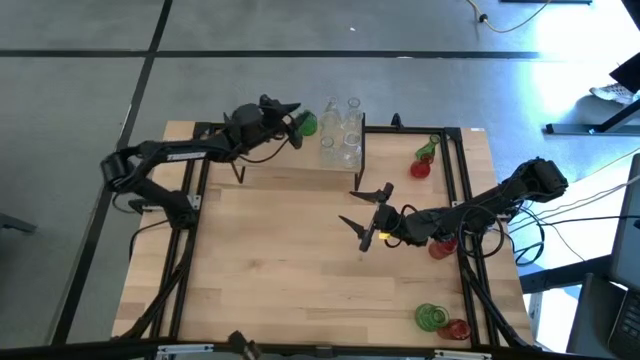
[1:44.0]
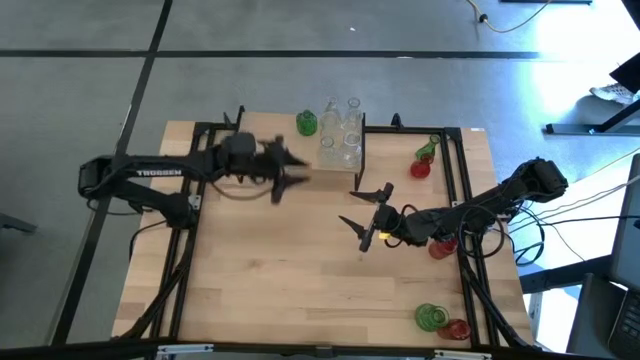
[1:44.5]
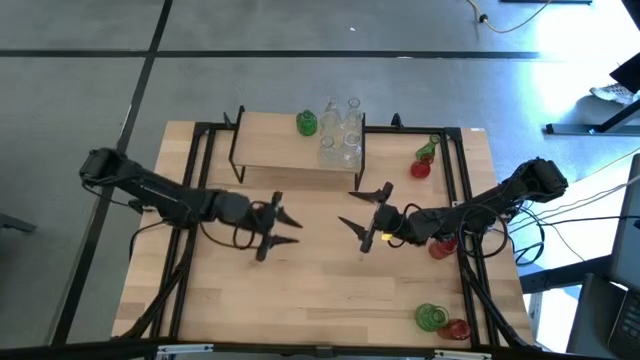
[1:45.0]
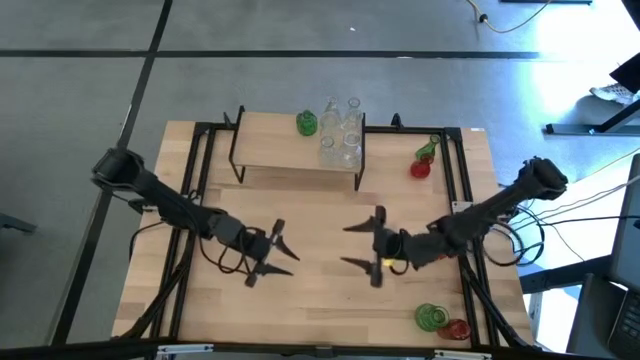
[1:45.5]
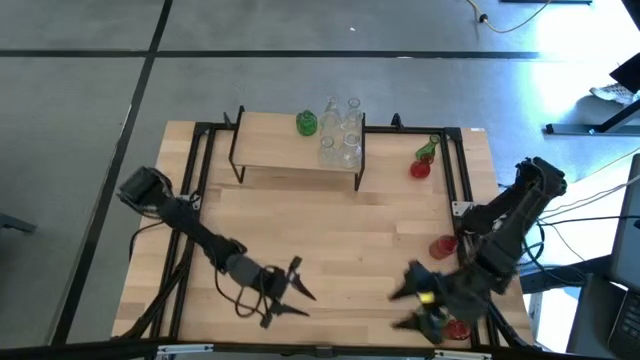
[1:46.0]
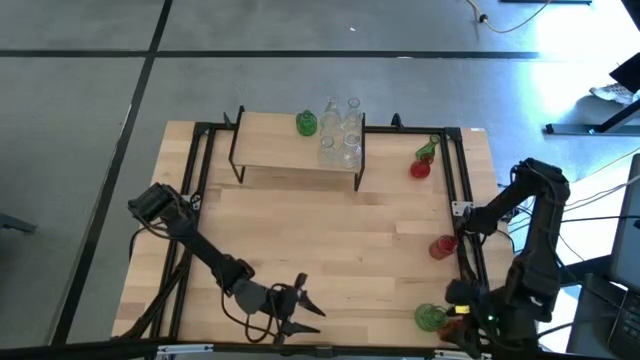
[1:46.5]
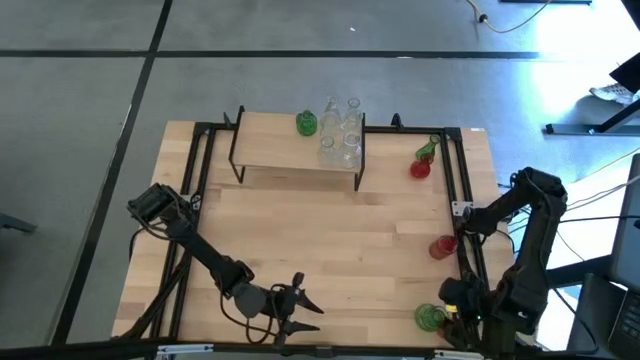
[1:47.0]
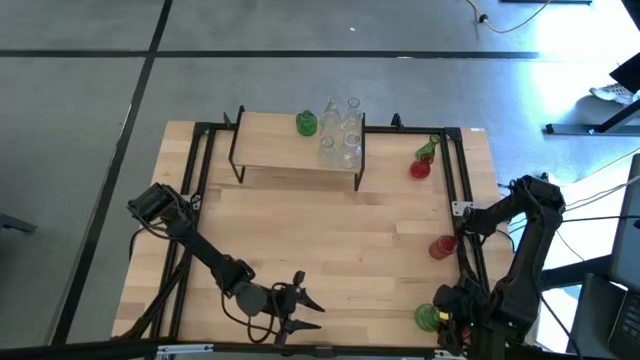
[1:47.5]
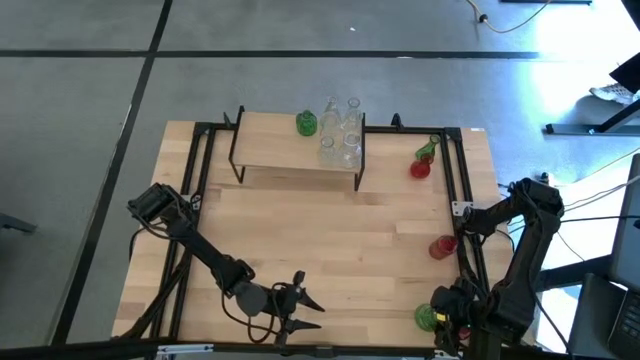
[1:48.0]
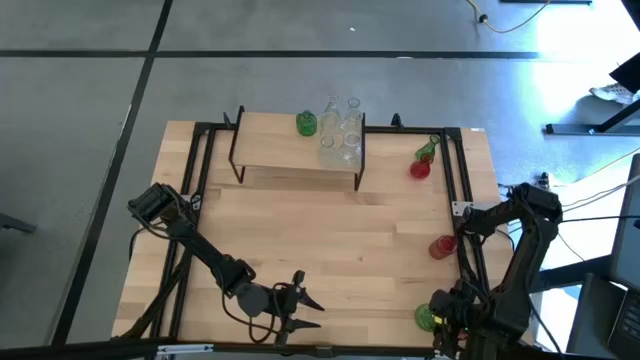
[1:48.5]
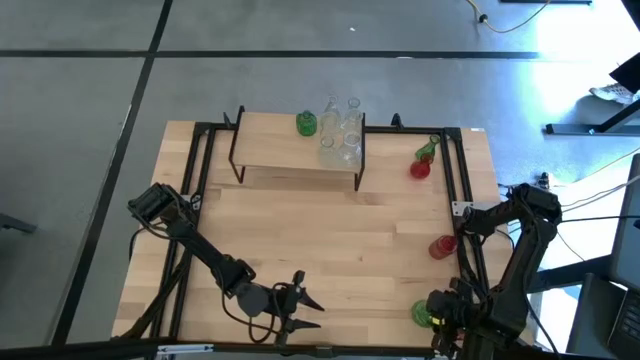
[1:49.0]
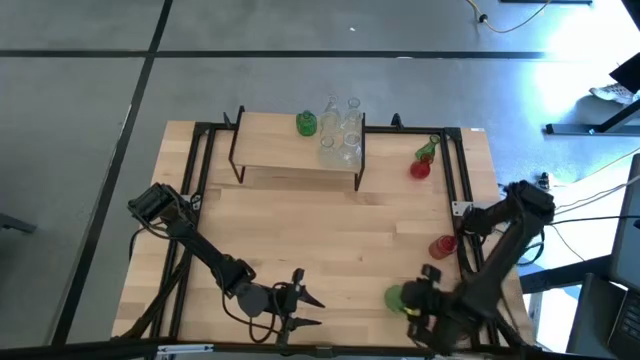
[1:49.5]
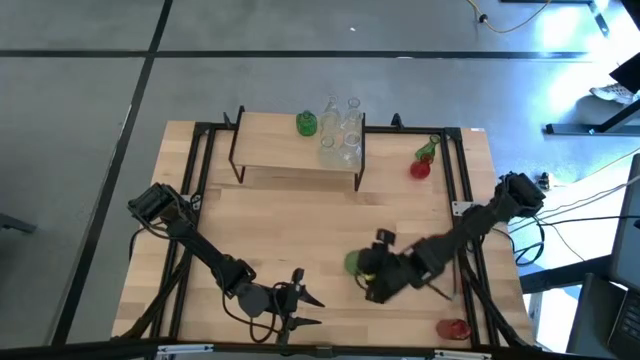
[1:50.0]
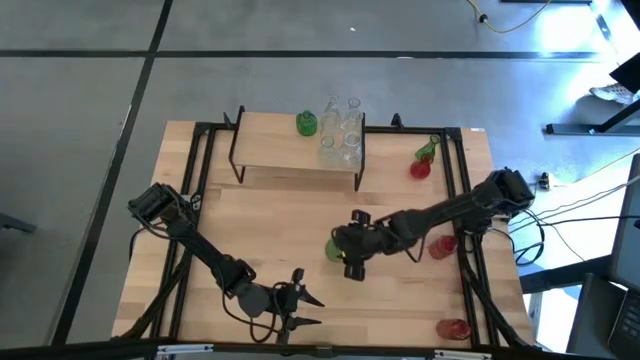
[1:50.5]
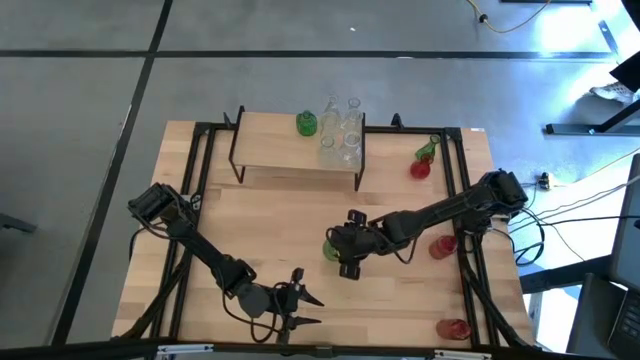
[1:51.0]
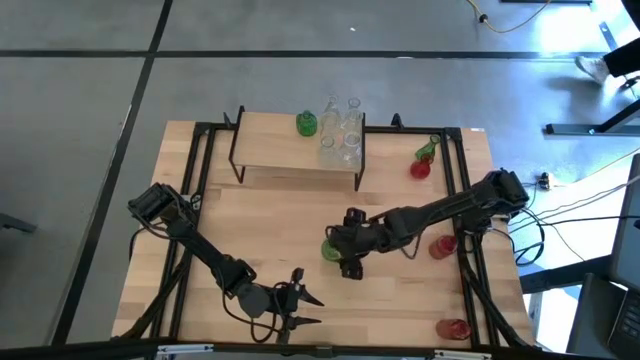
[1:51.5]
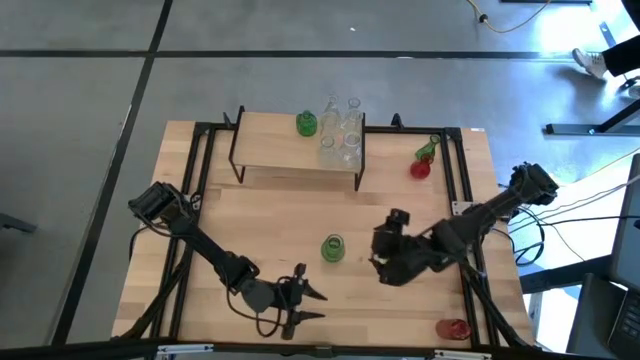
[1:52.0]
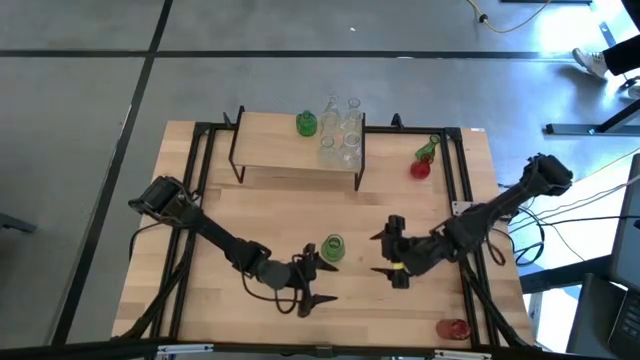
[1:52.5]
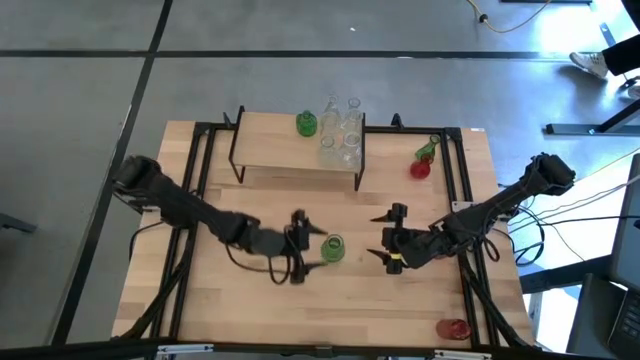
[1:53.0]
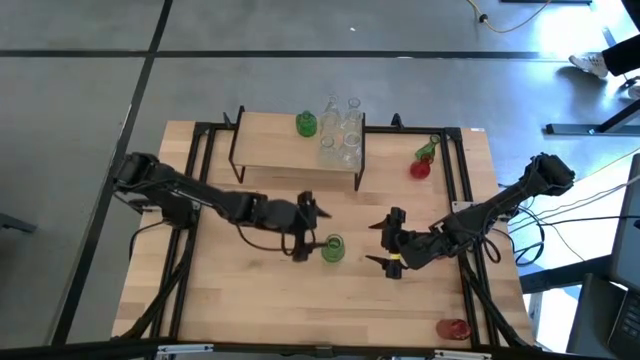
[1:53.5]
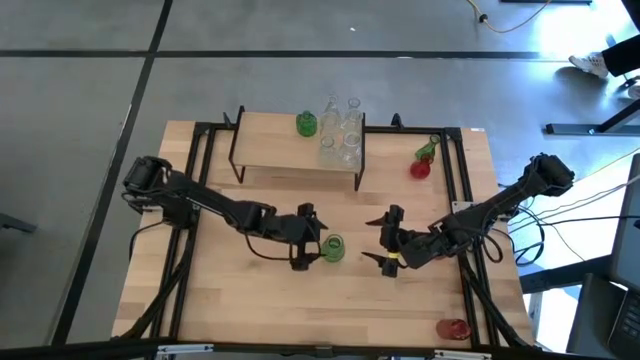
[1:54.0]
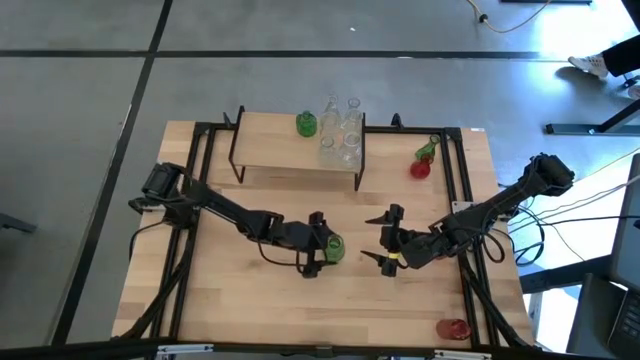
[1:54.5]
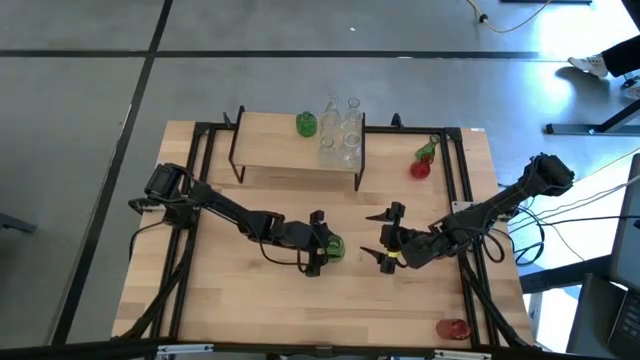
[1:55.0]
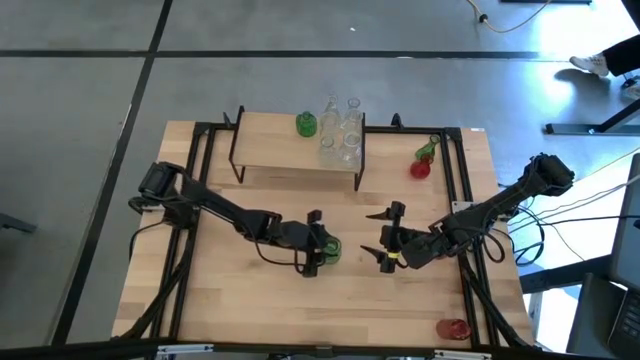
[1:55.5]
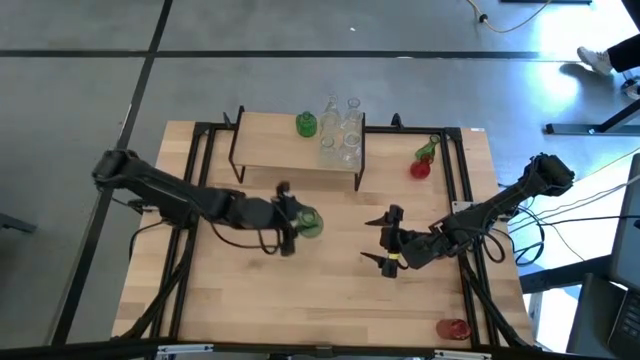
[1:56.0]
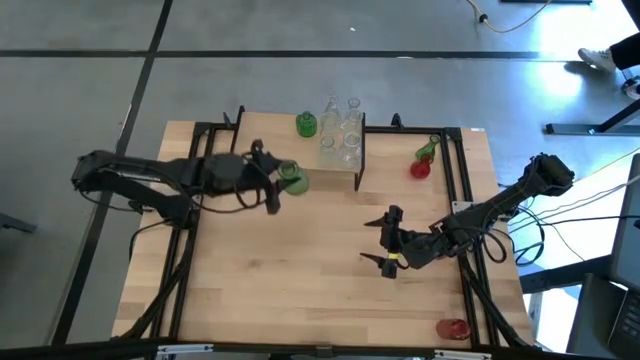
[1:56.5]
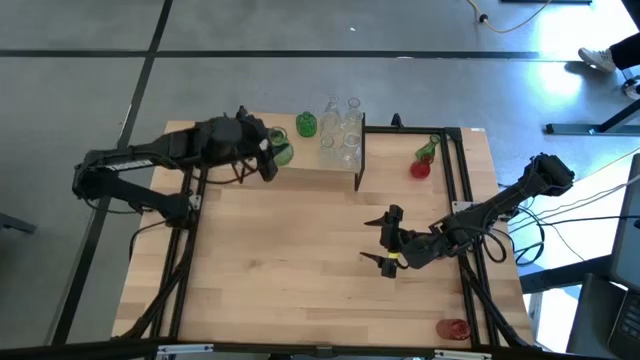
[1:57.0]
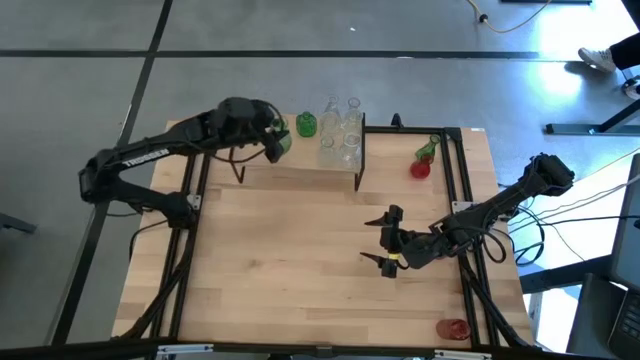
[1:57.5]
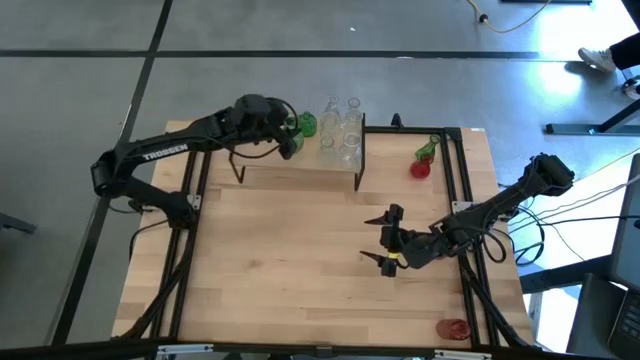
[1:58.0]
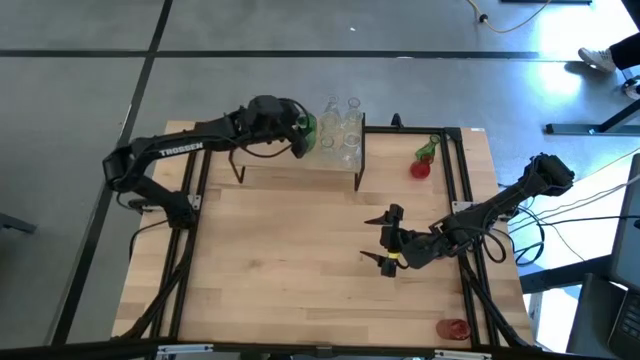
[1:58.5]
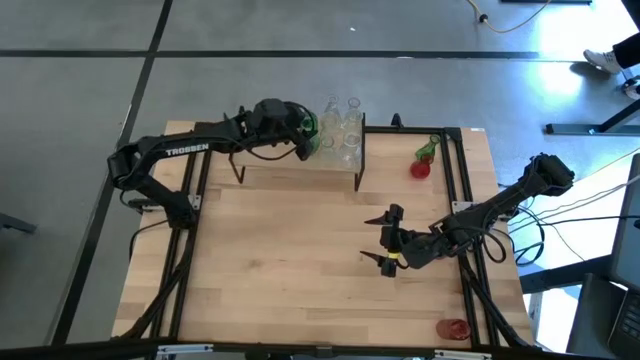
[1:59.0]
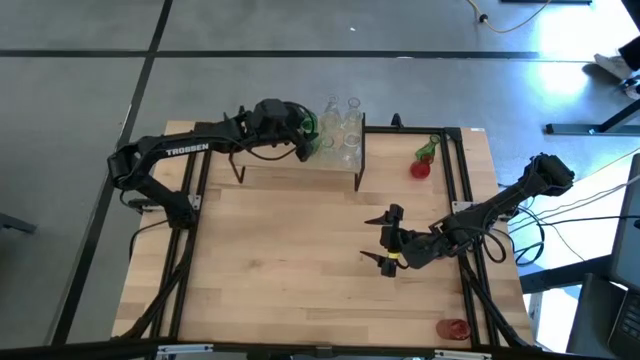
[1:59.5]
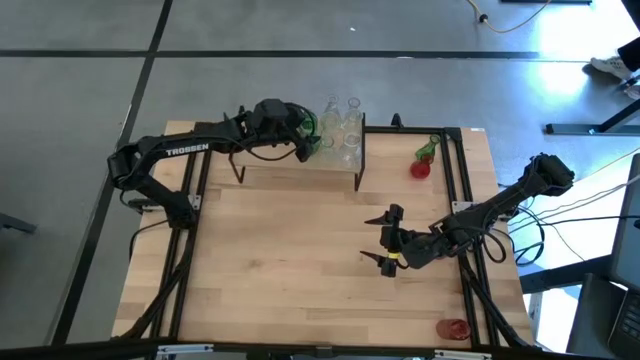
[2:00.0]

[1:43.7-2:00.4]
Task: sort vases onto shelf
Put the bottom green vase aligned with the other green vase on the shelf

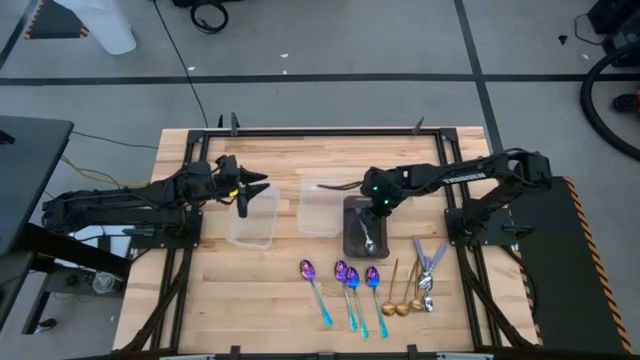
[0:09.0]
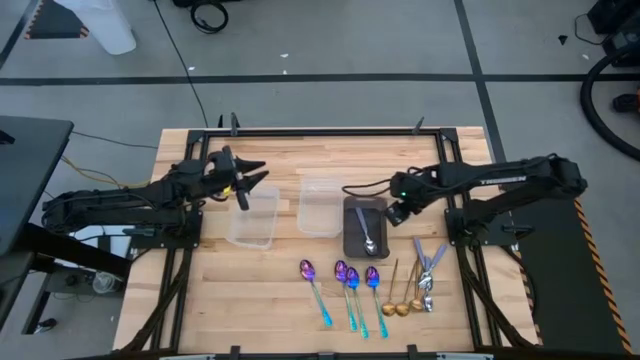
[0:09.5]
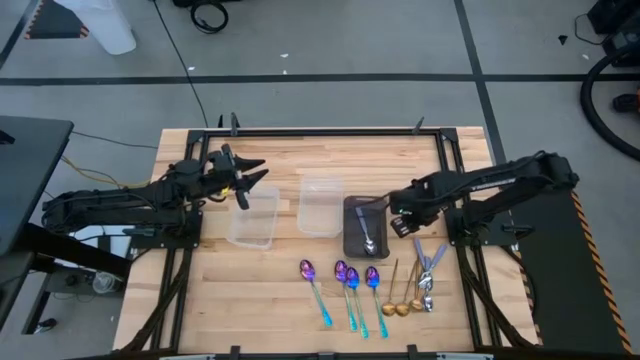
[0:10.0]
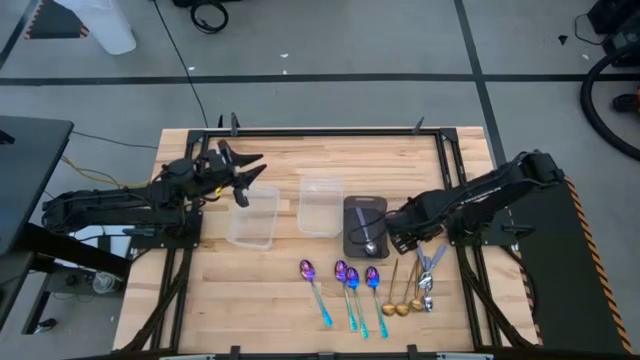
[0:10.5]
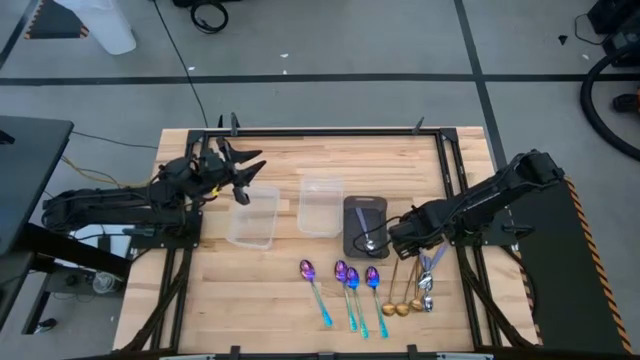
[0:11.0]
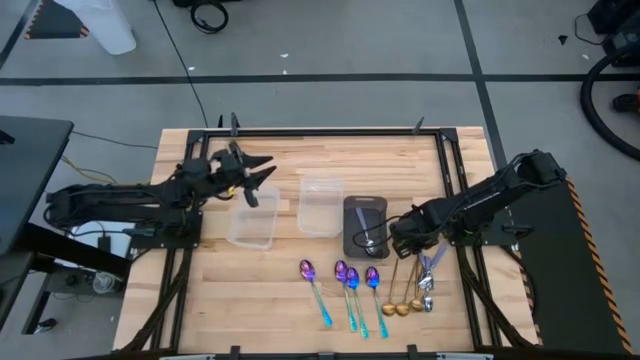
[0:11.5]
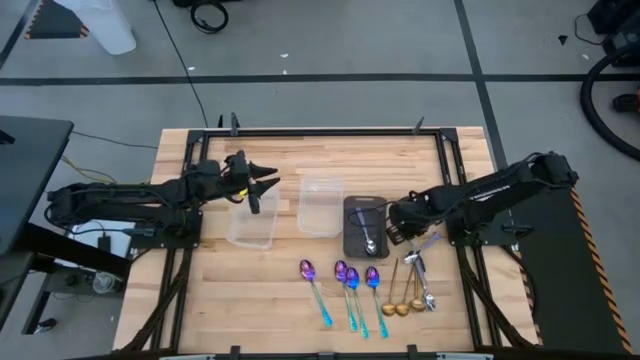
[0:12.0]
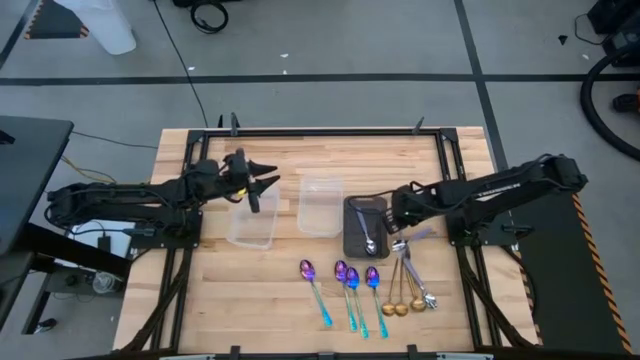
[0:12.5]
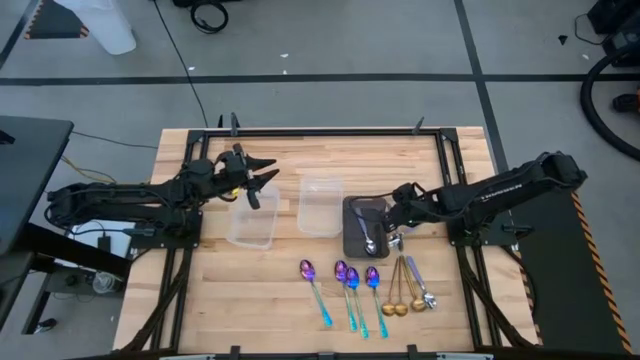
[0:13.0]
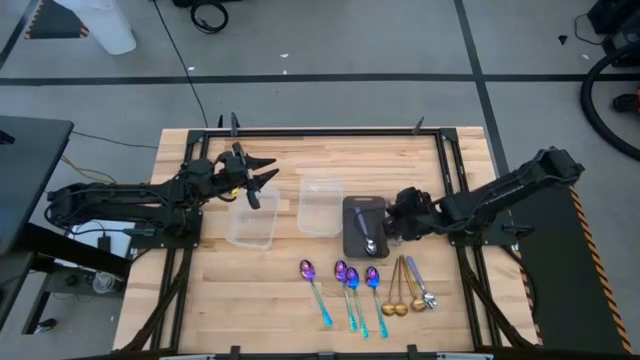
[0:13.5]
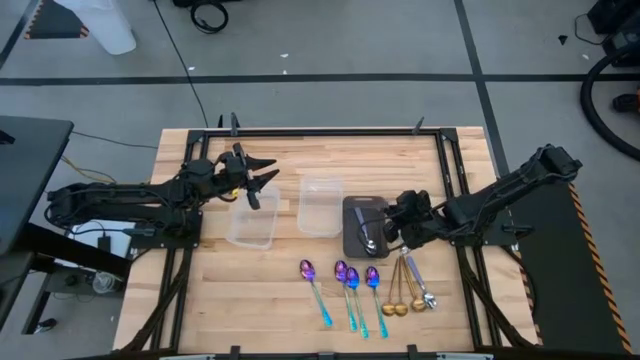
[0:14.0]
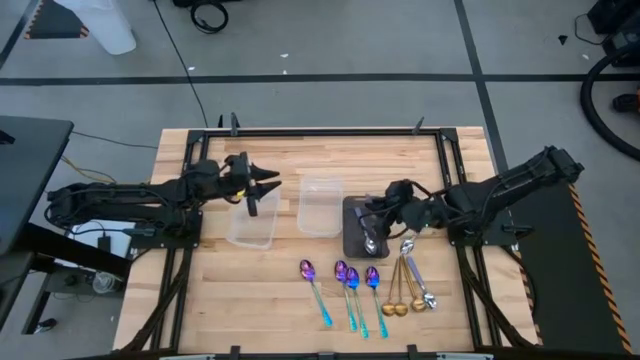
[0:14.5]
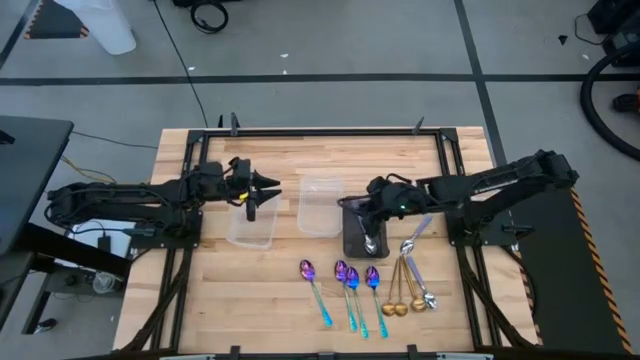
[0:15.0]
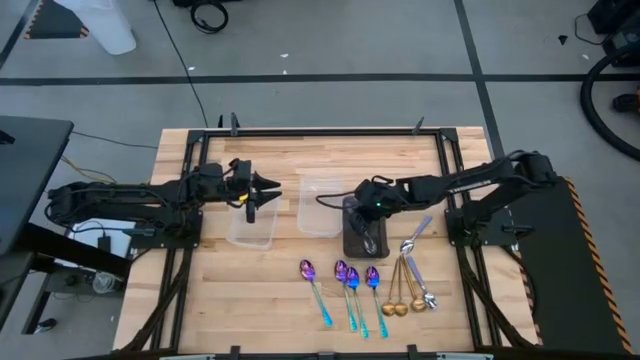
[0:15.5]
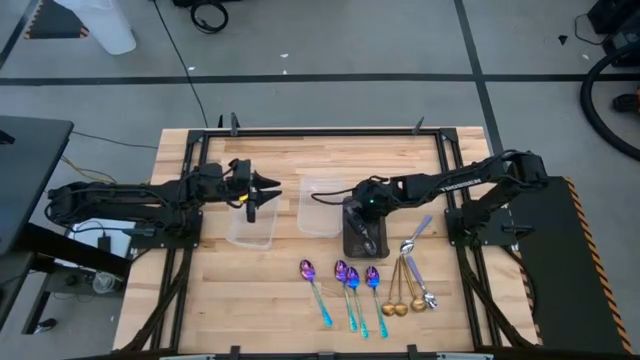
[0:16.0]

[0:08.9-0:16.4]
Task: Sort silverware by color (type)
Put the purple spoon into the black bin
